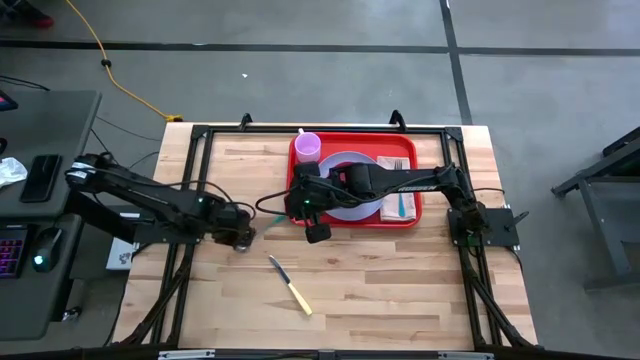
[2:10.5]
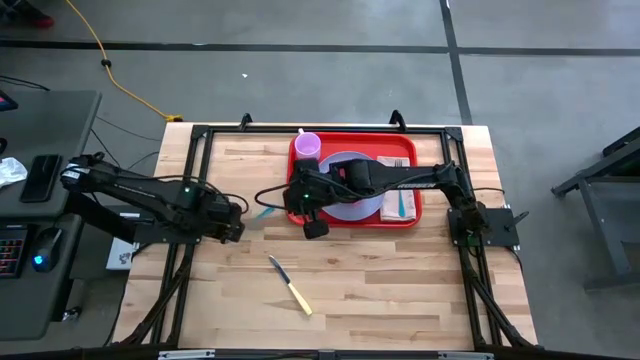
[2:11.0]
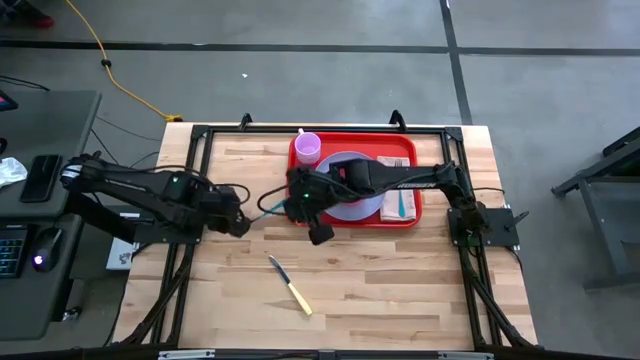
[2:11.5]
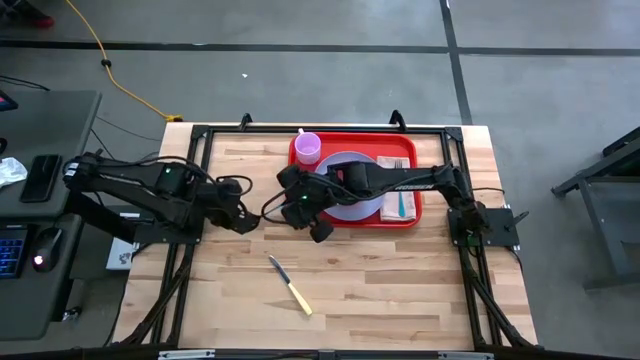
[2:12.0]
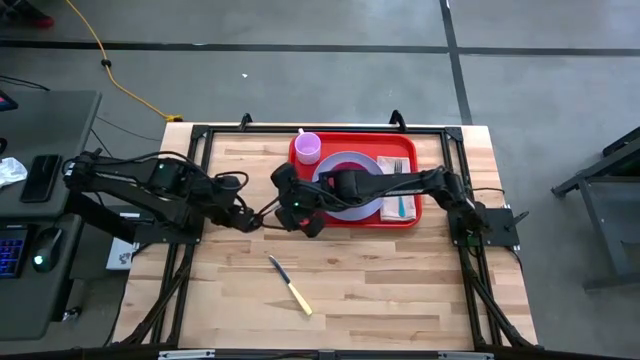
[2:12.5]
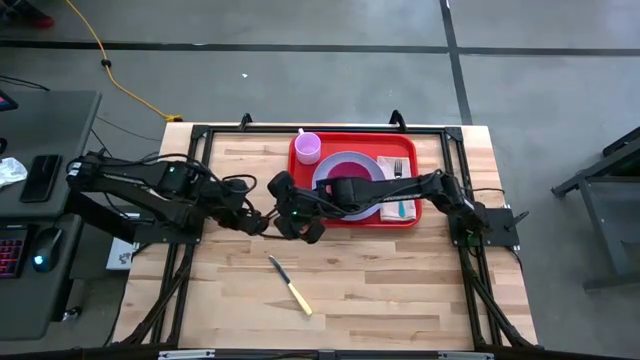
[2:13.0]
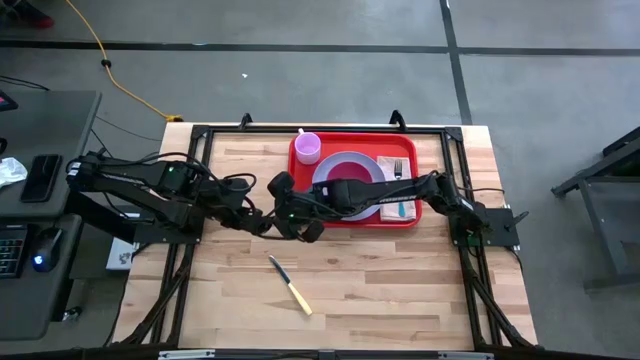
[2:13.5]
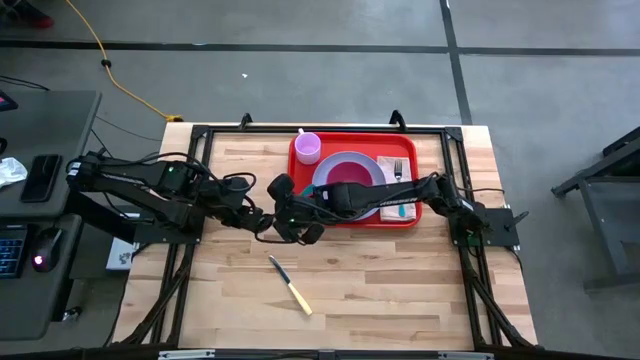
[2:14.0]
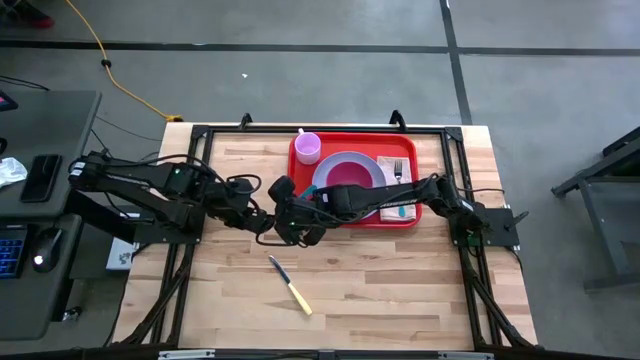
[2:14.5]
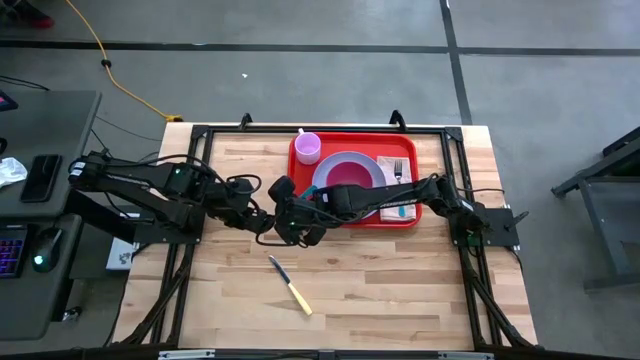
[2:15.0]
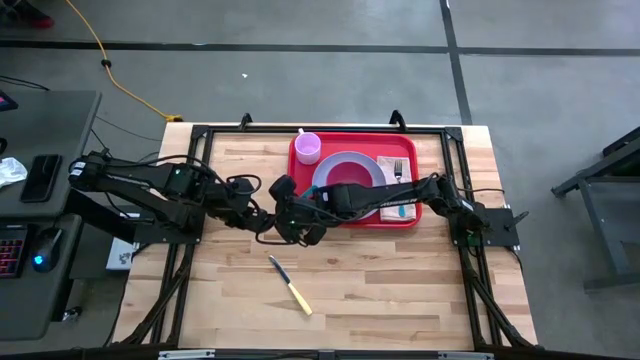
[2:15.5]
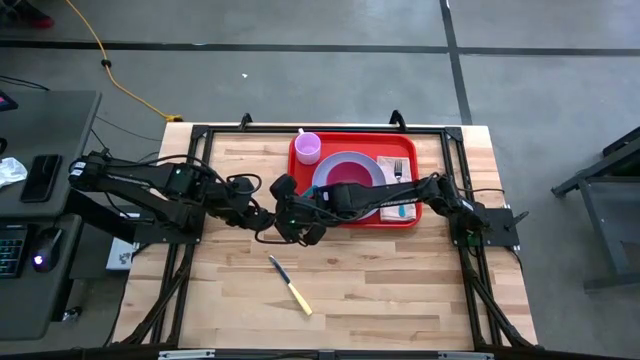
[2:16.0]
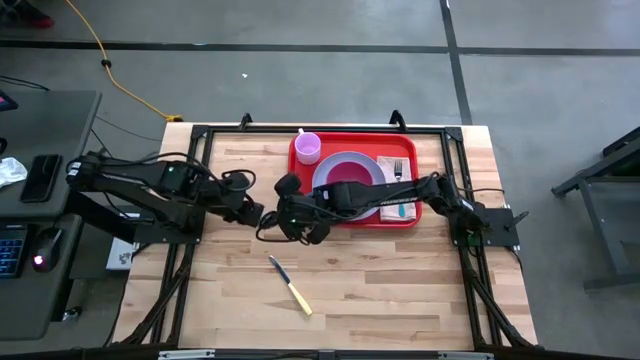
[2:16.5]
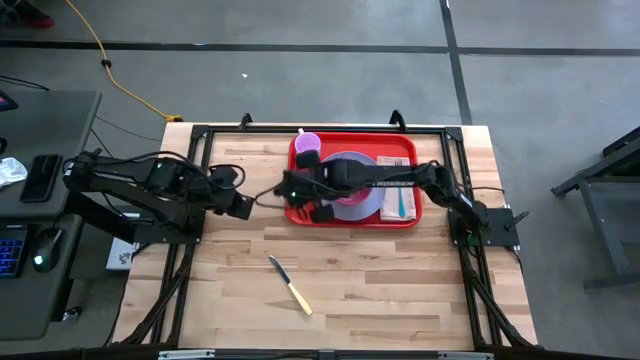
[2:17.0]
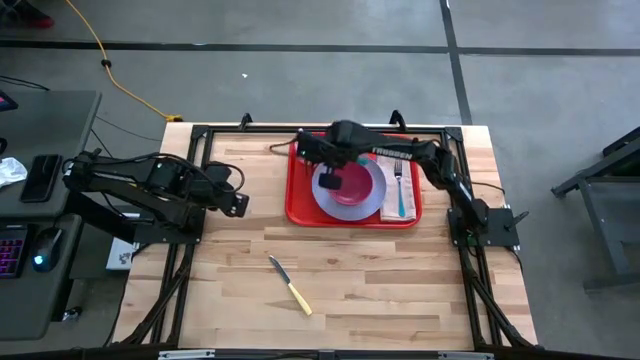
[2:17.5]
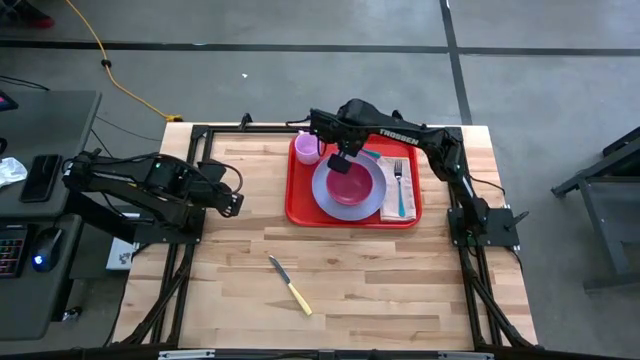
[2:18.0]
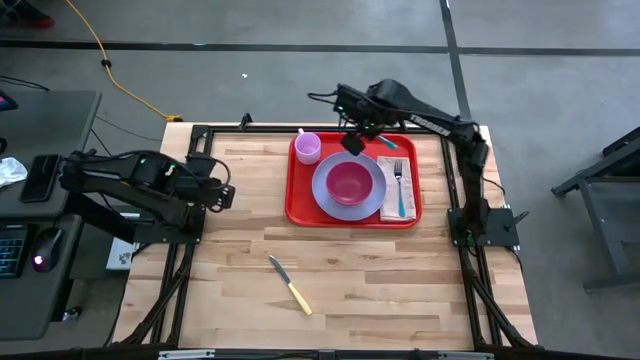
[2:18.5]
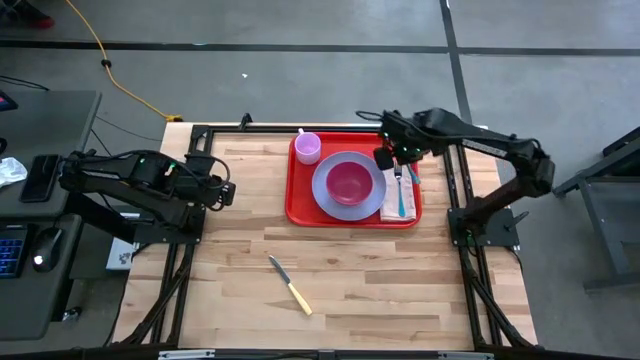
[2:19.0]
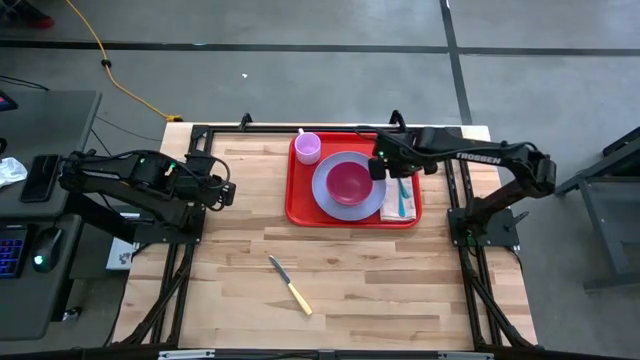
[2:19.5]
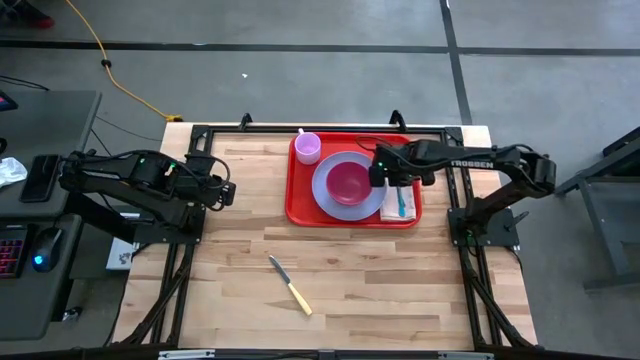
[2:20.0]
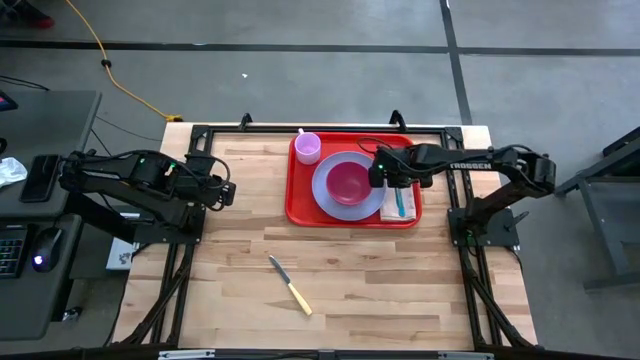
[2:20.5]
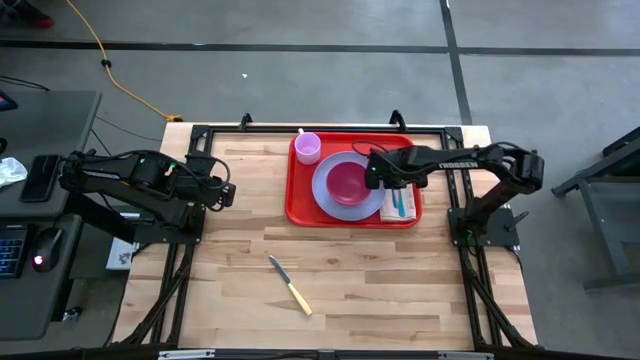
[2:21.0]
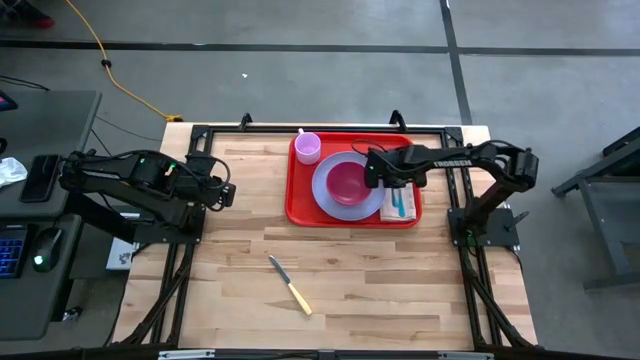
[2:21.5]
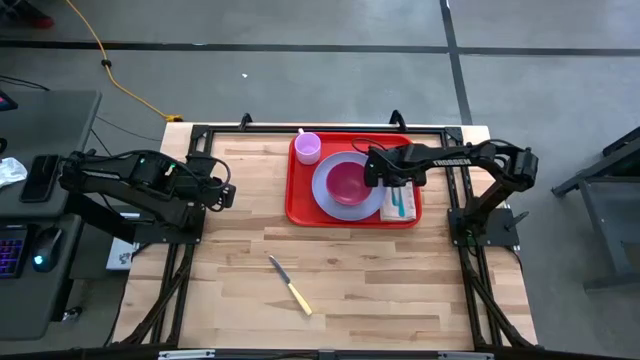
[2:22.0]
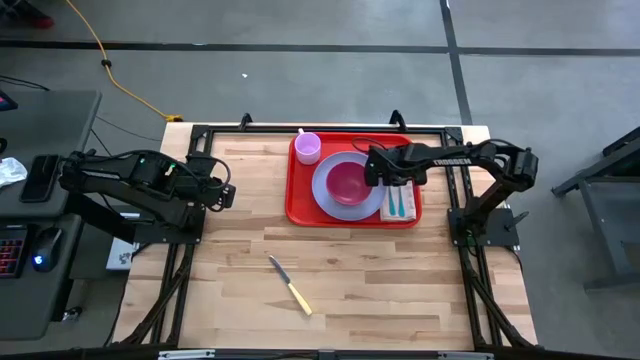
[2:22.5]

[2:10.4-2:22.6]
Task: Set up tray
Put the blue spoon on top of the napkin to the right of the purple plate in the red tray

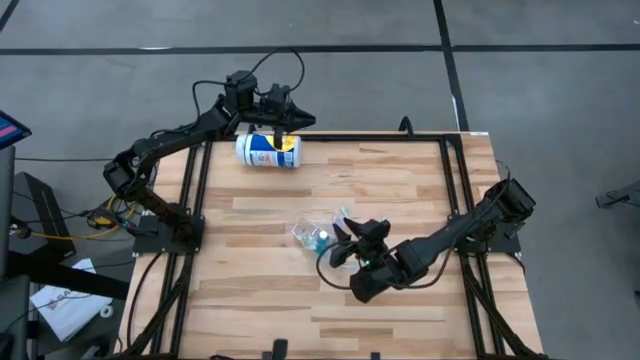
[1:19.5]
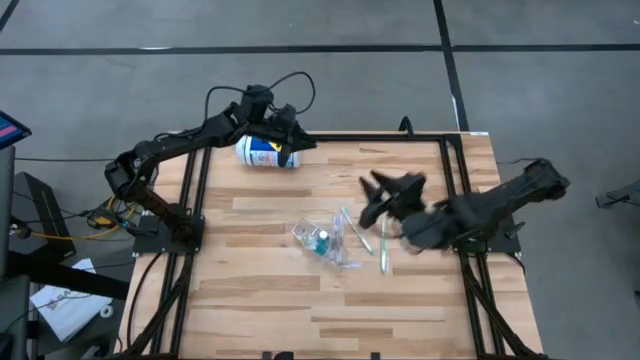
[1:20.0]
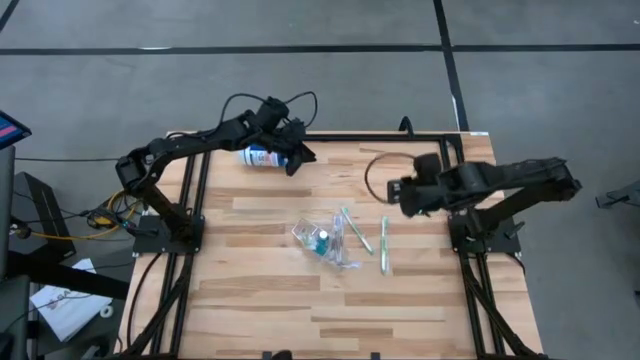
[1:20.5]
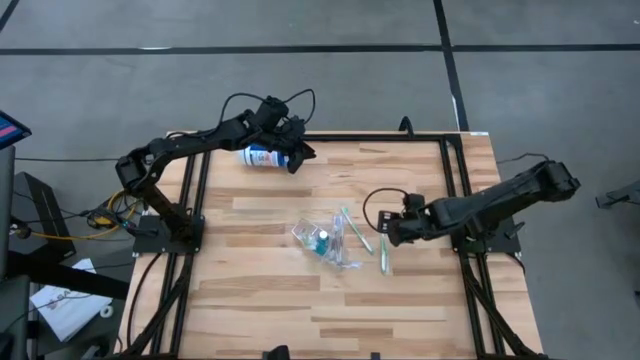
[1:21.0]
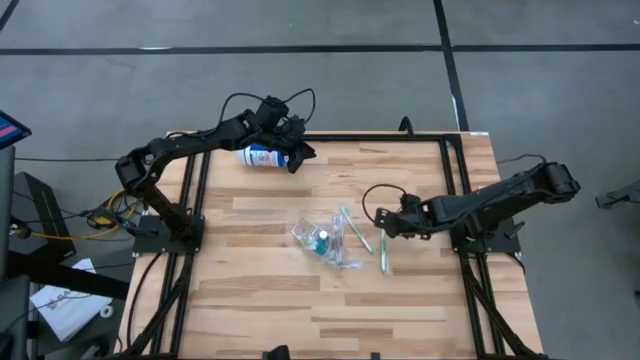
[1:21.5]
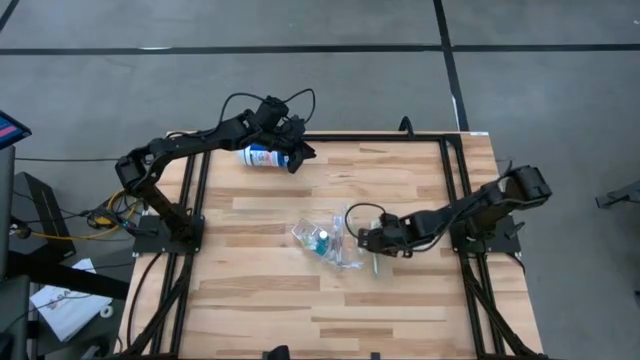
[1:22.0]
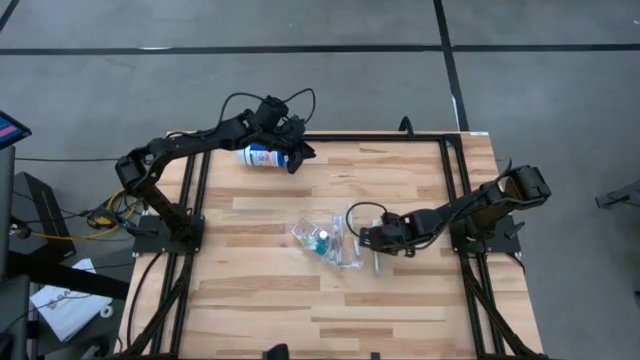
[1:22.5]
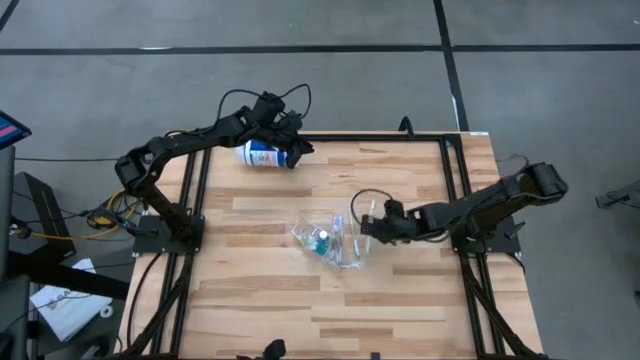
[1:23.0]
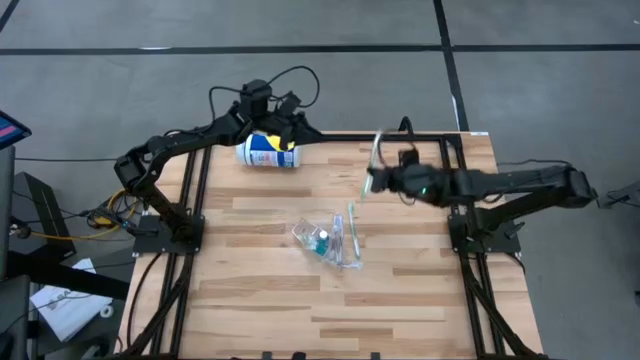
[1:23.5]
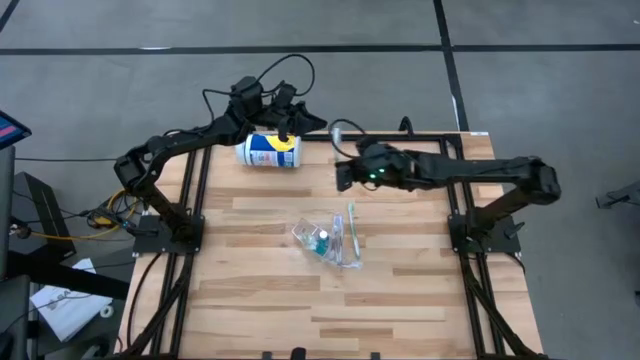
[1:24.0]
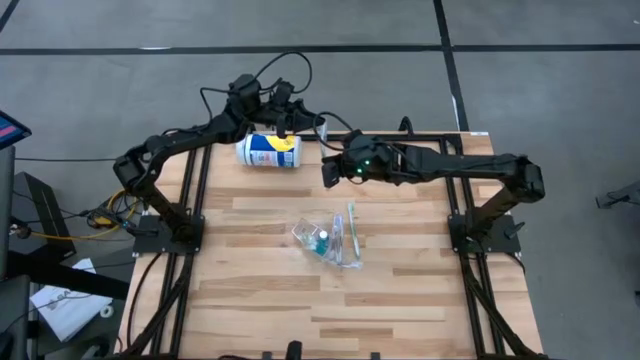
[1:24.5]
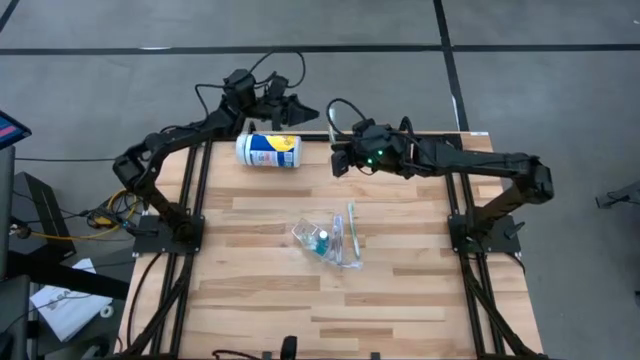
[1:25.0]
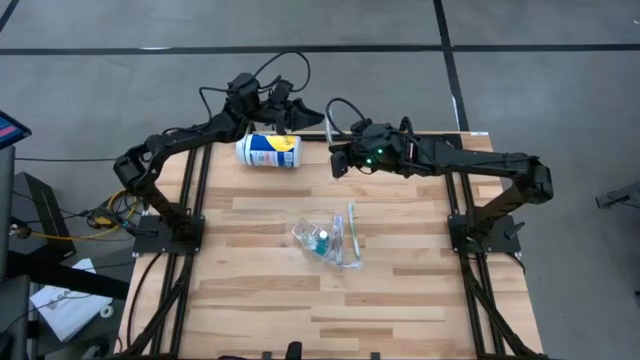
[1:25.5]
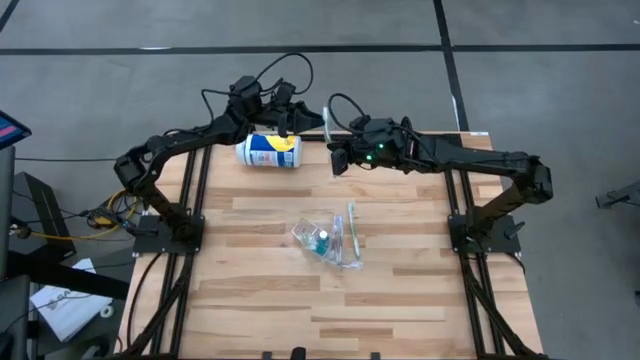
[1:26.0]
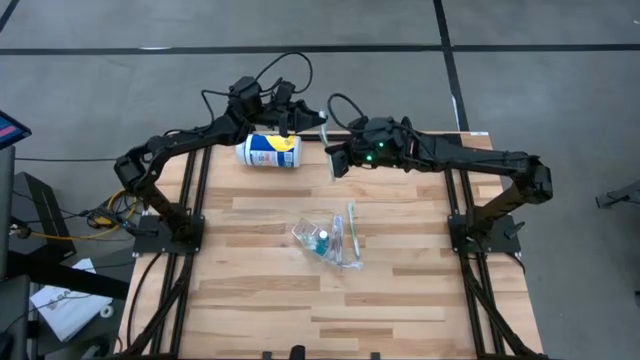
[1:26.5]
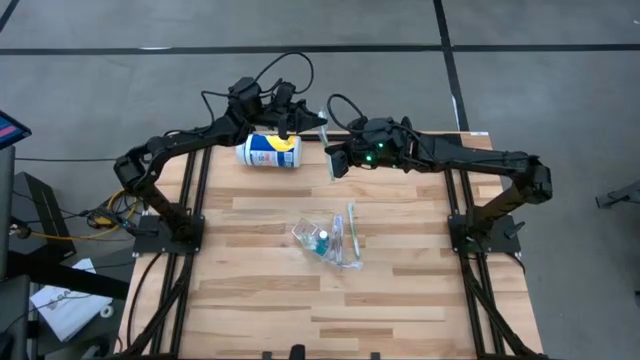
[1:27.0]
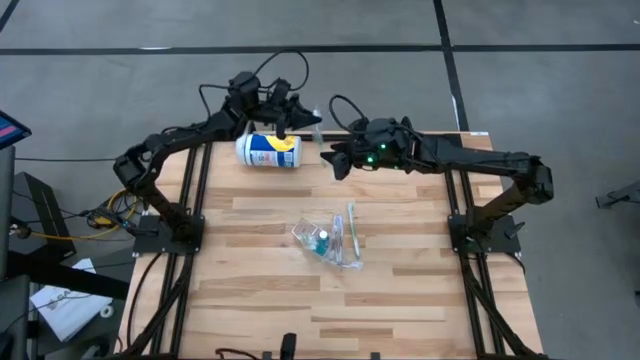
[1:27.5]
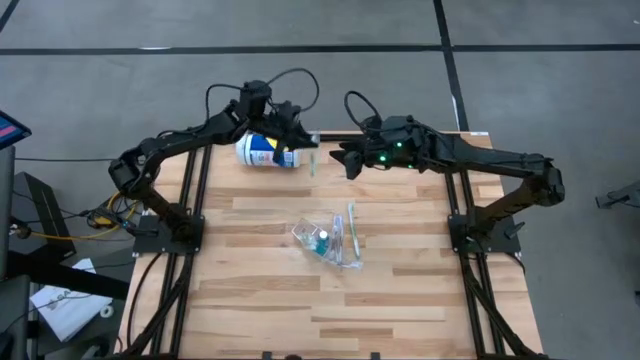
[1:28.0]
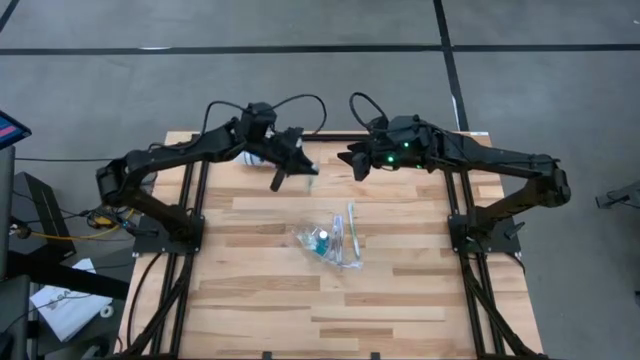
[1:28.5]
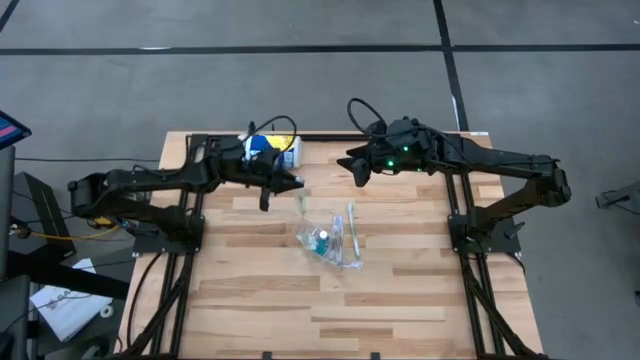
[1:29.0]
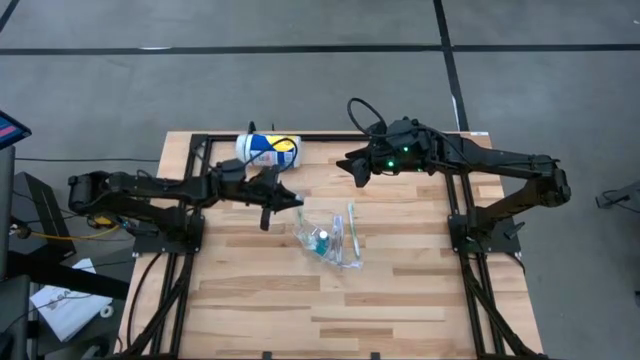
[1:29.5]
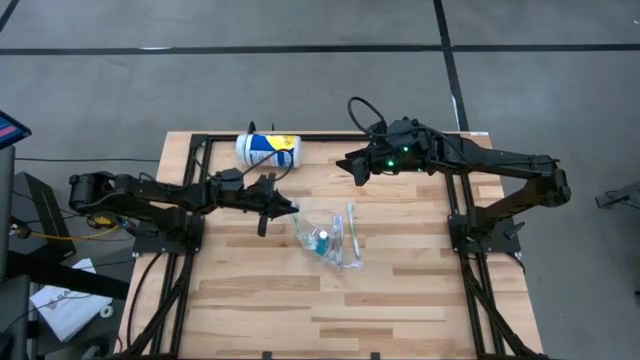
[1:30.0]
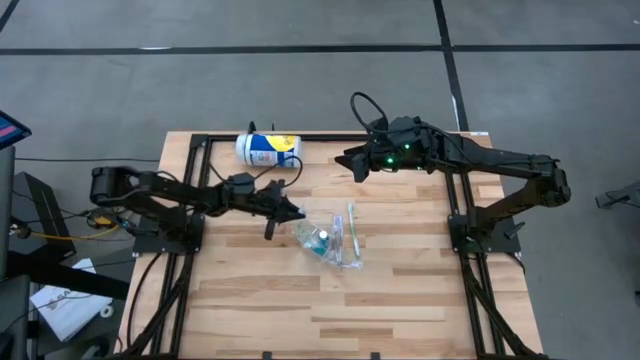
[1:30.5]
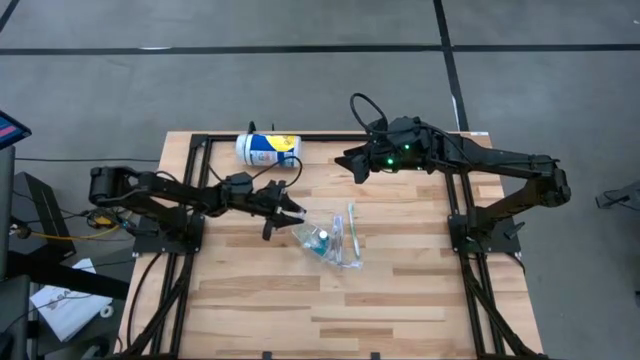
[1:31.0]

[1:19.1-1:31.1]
Task: Pick & Place toothbrushing station
Put the green toothbrush into the left compartment of the transparent organizer
